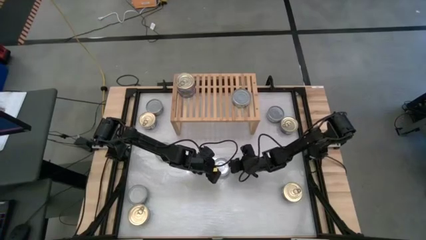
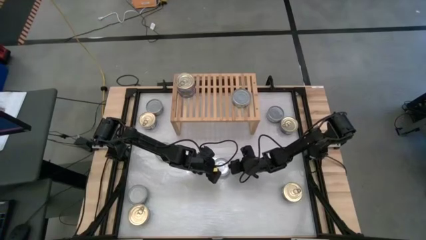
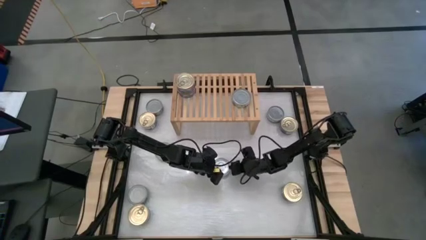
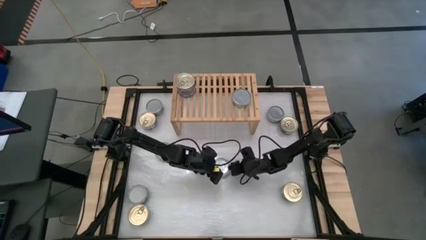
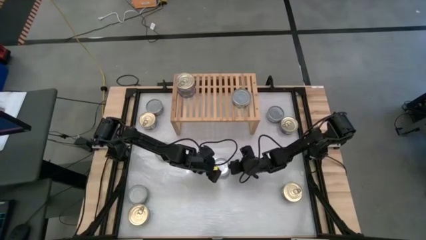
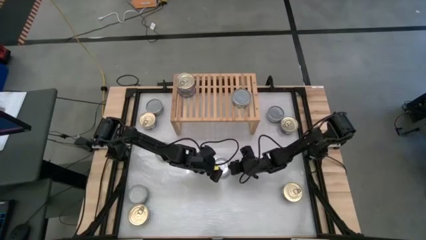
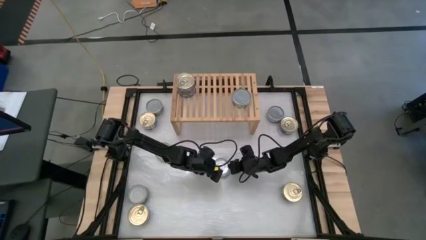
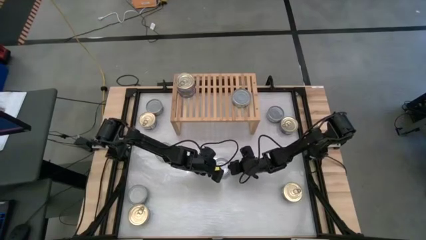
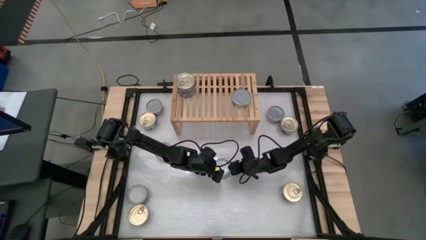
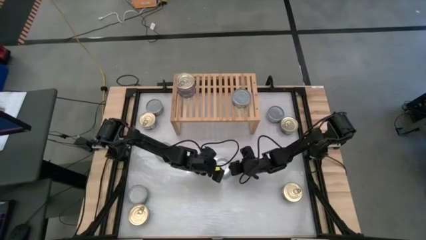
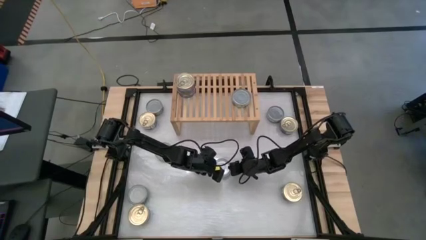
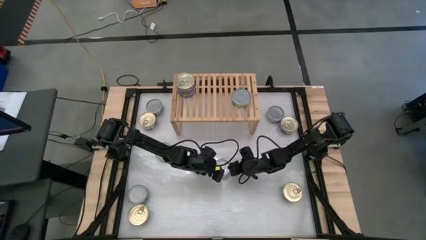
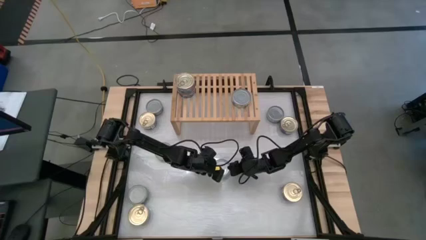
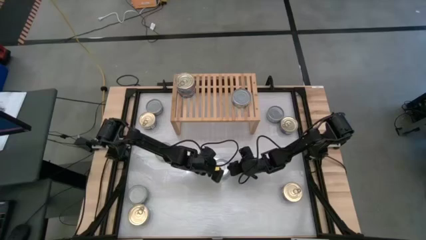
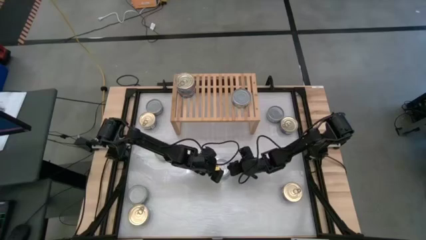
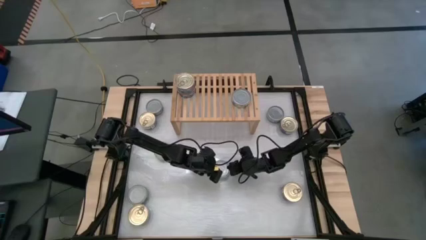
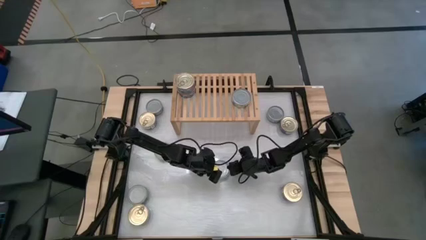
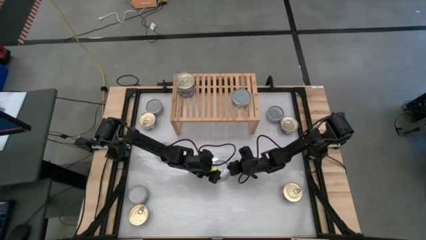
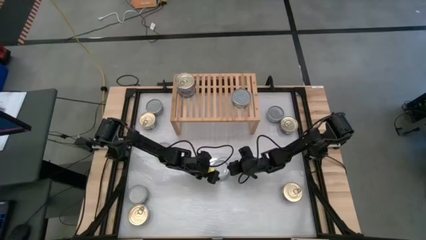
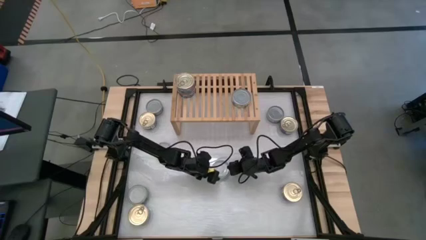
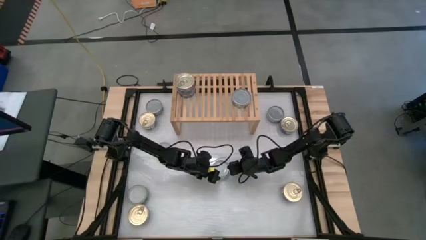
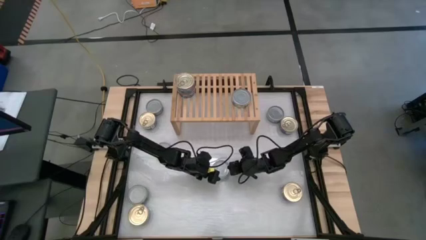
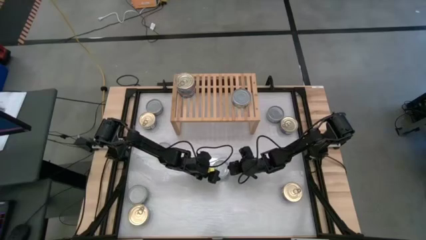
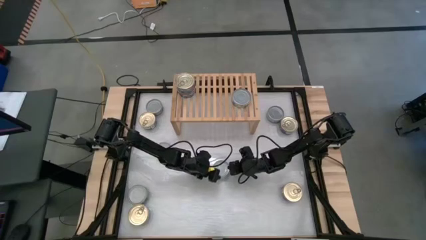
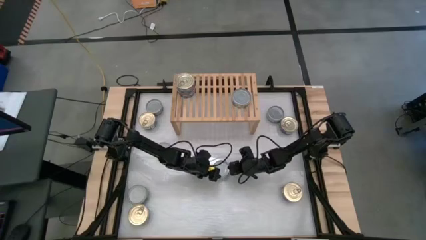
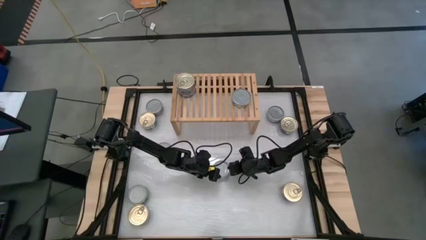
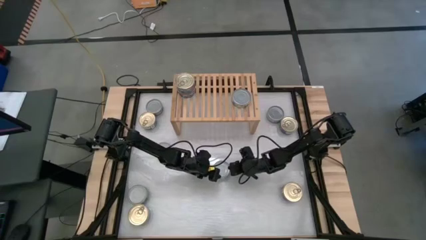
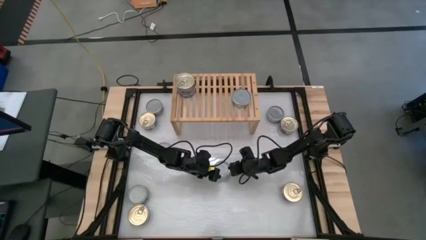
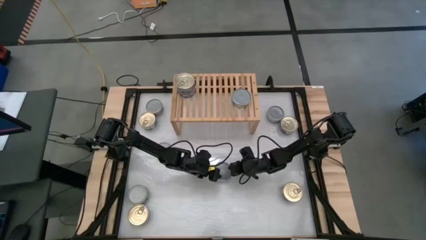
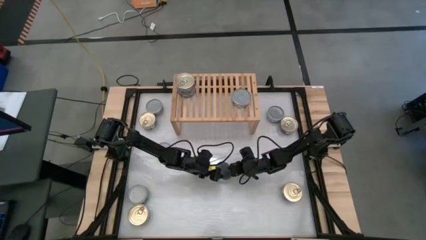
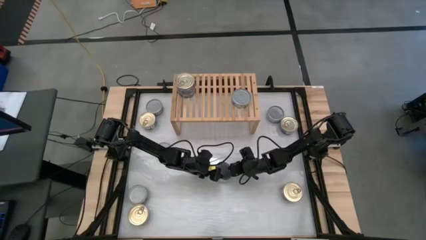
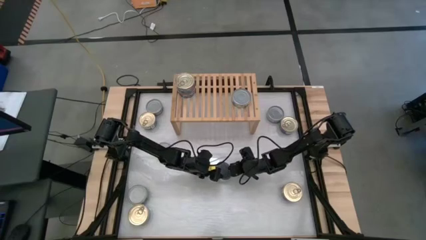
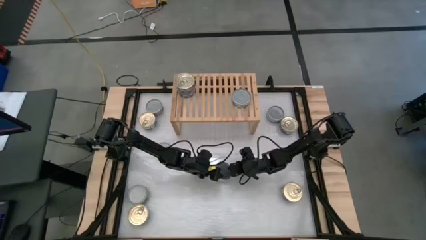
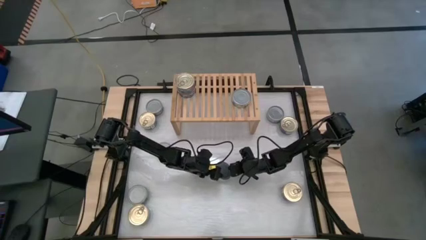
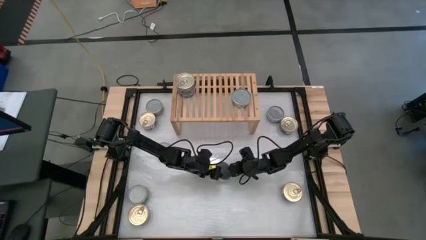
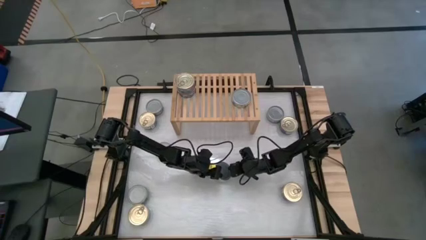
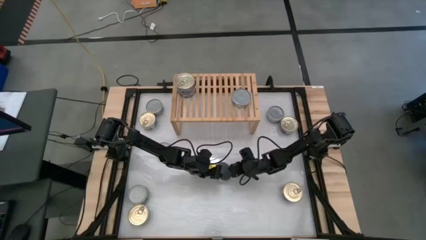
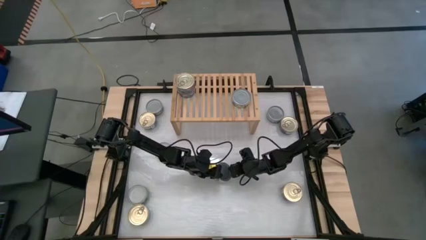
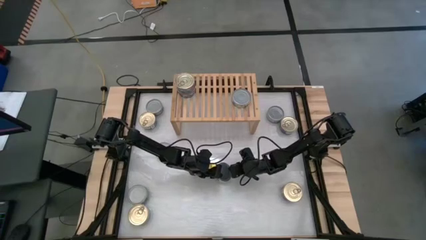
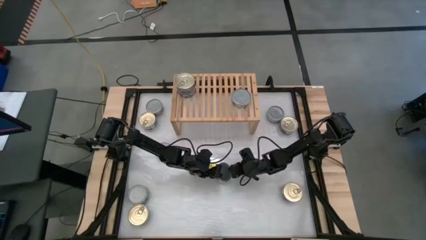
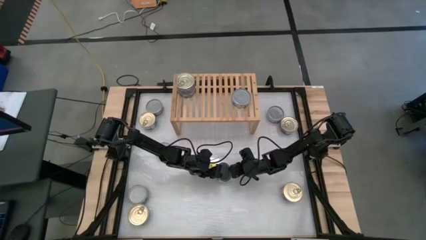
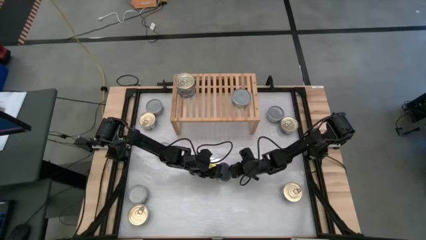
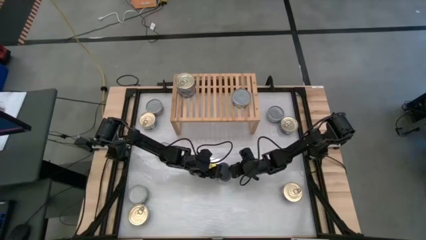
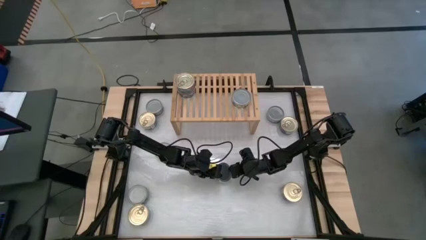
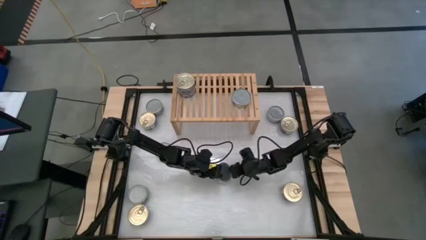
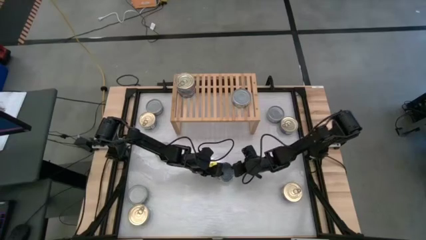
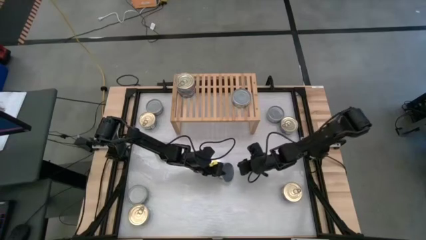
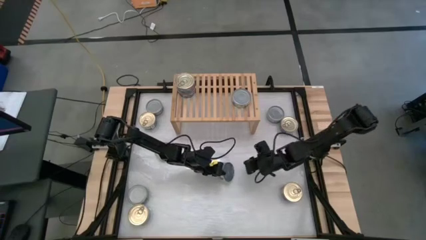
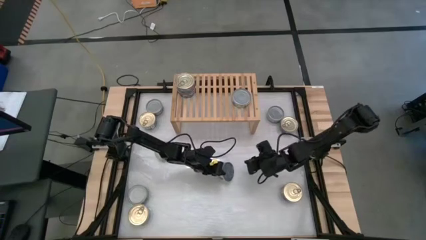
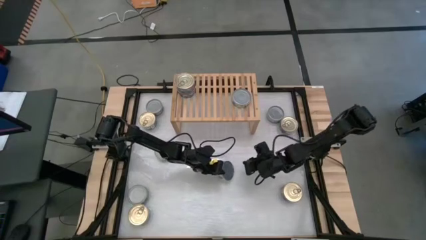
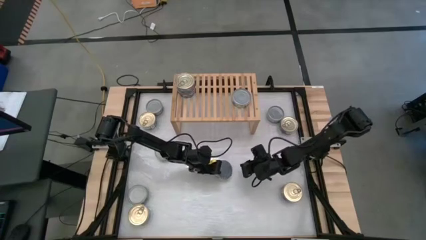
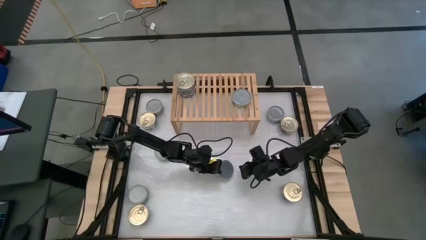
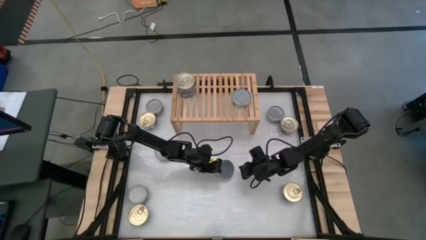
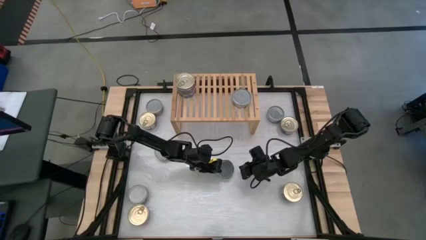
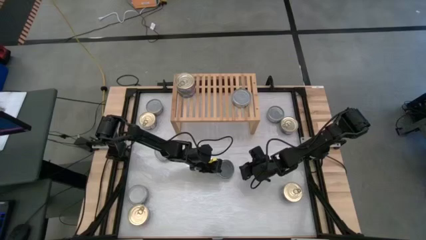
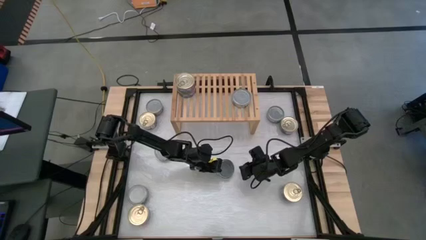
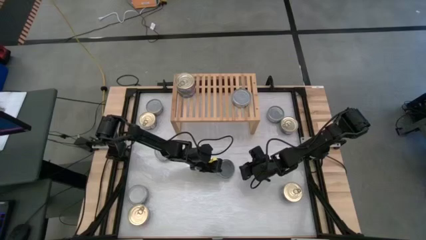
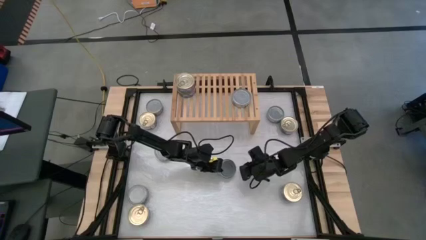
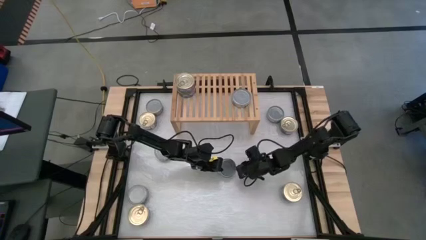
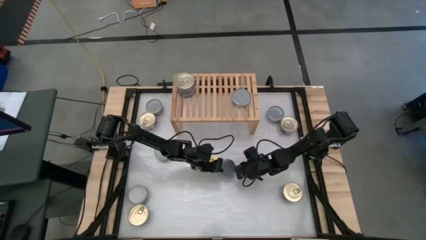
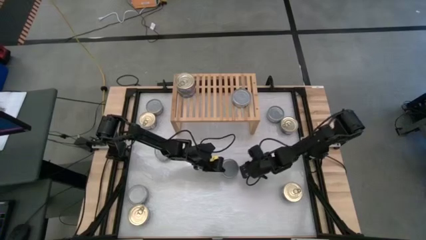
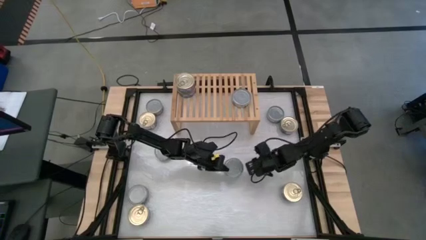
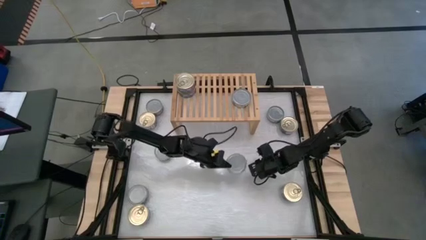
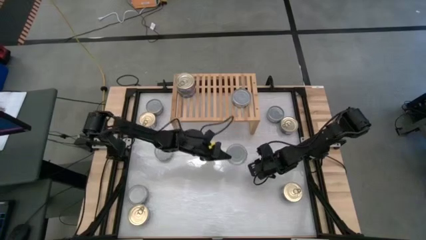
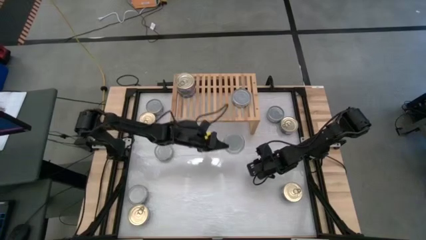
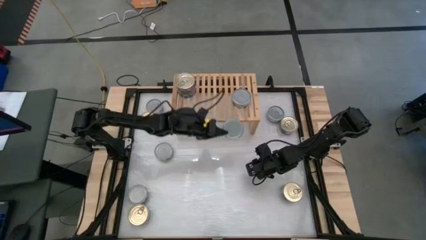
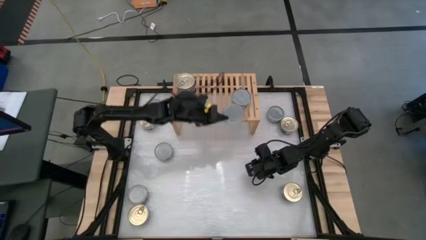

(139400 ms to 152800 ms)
Task: Stack canned seafood by type on shelf
Stack the green tuna can on top of the other green tuna can on the shelf

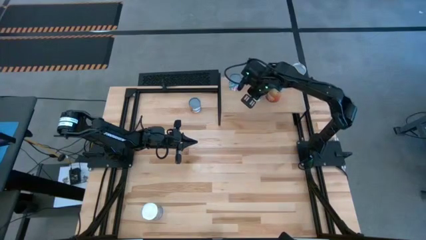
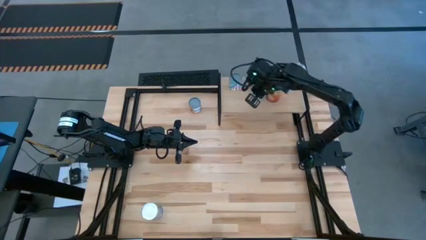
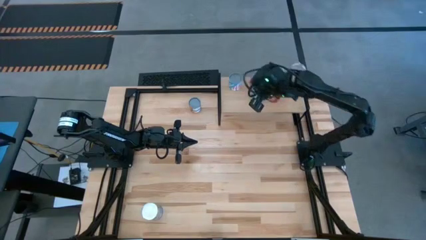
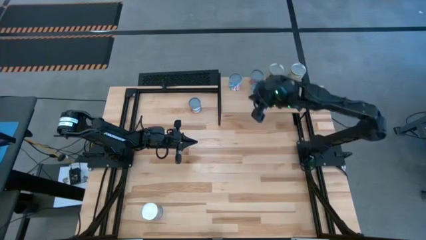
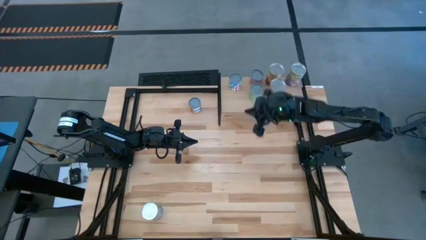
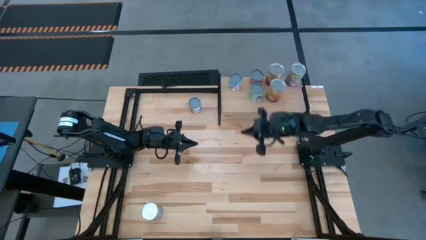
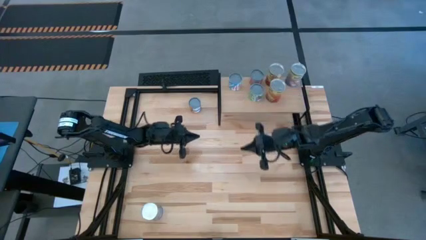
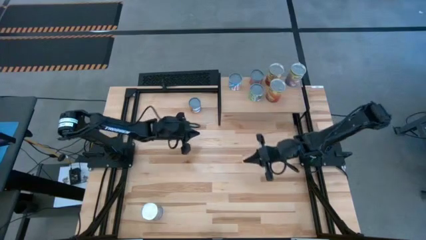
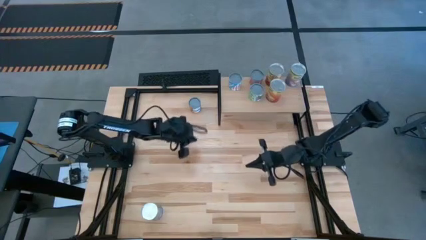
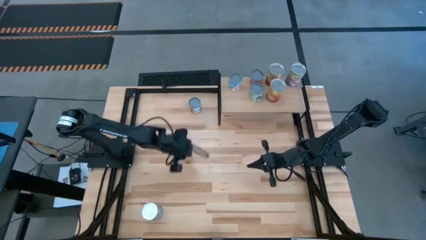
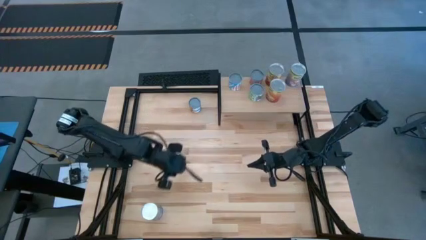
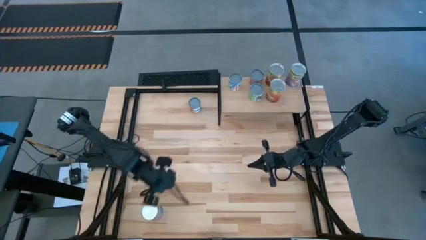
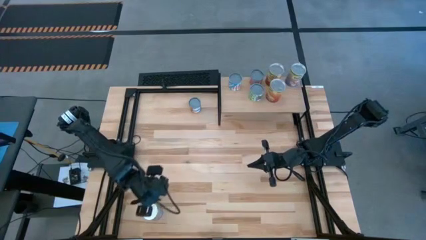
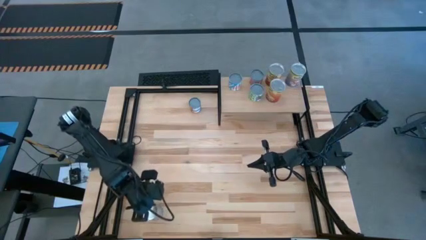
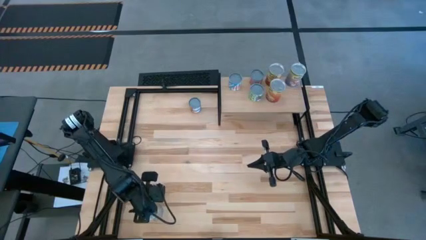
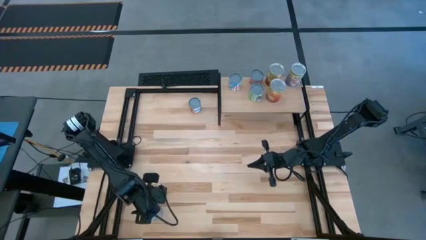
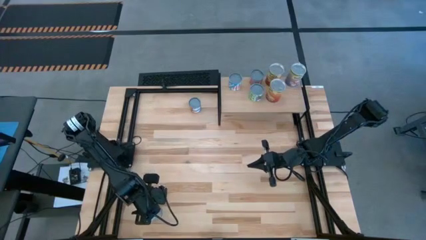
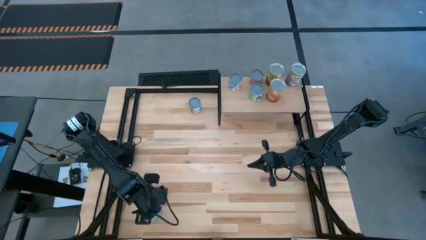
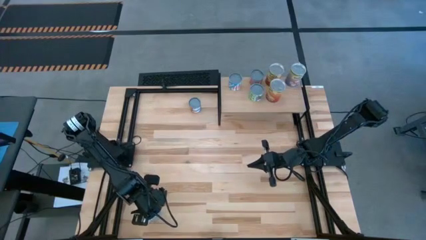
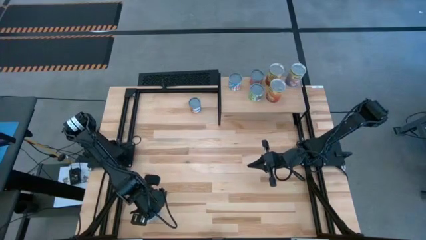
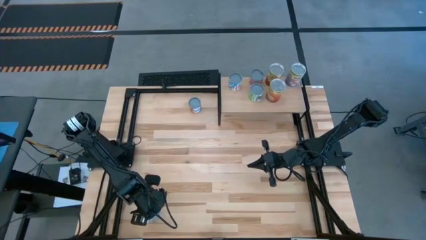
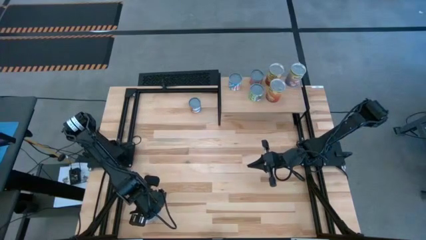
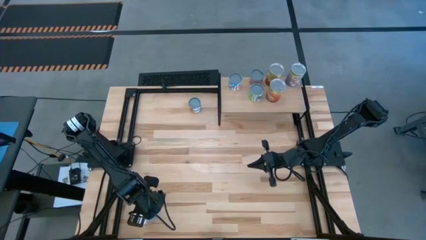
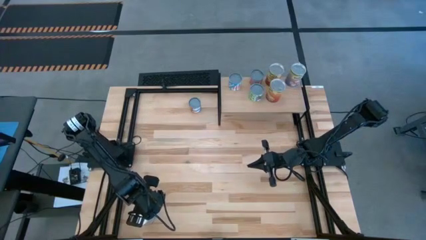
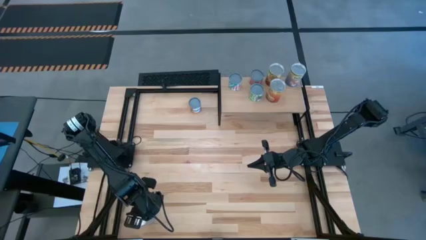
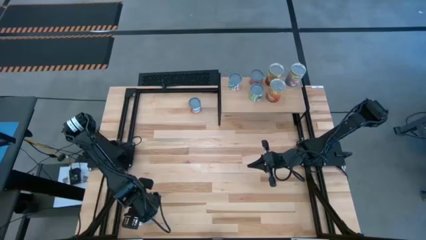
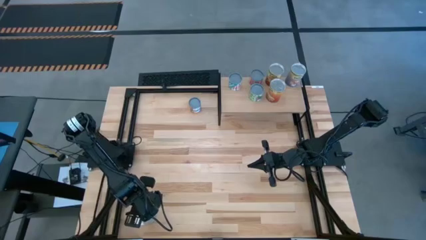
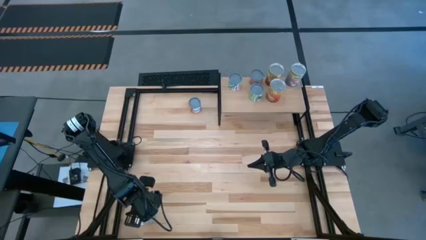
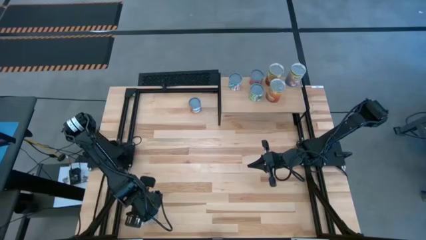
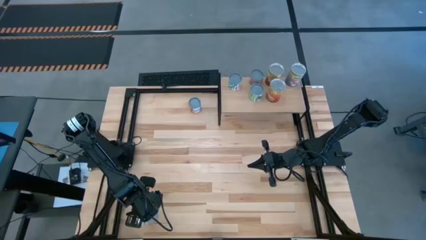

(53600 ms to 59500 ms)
Task: Pick and place cans onto a shelf
Put the canned peaches on the shelf
